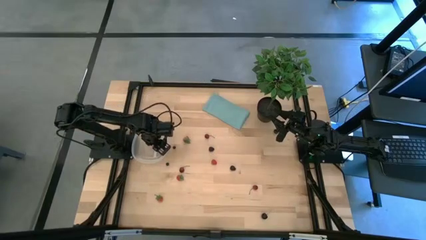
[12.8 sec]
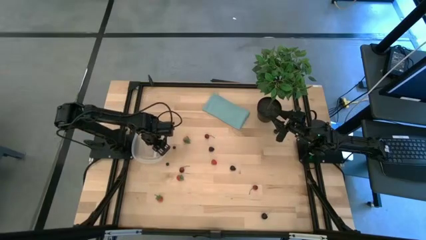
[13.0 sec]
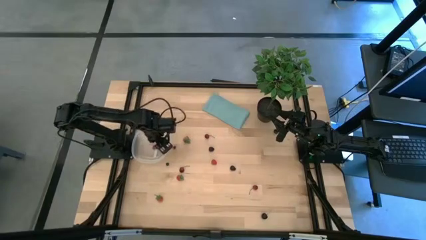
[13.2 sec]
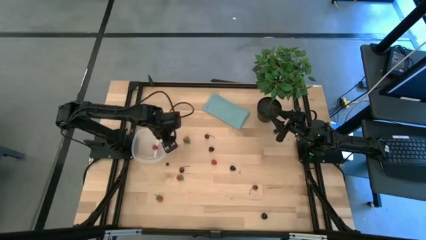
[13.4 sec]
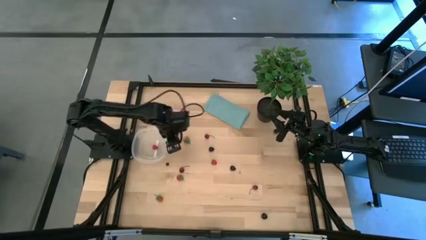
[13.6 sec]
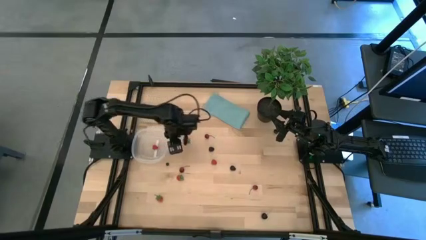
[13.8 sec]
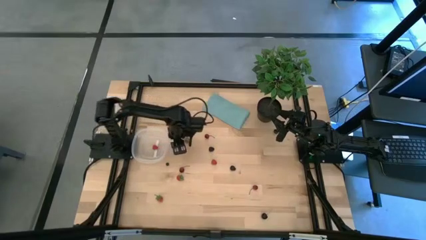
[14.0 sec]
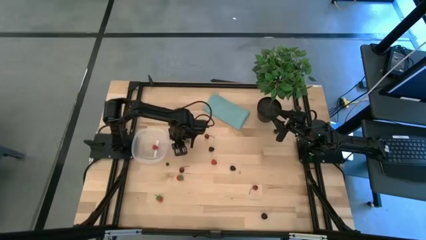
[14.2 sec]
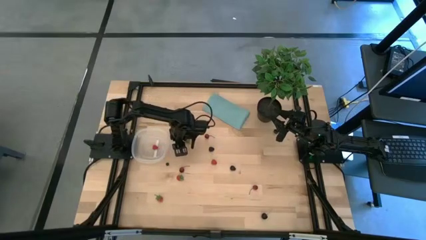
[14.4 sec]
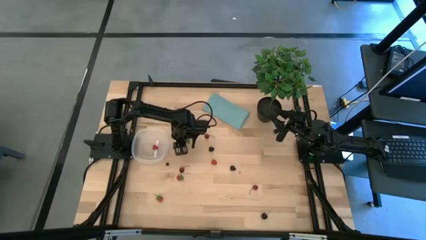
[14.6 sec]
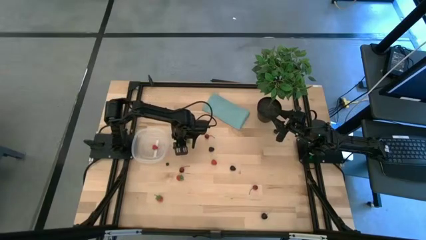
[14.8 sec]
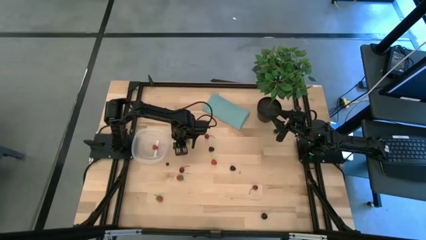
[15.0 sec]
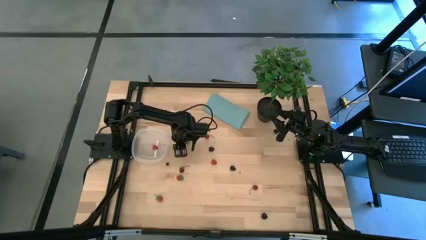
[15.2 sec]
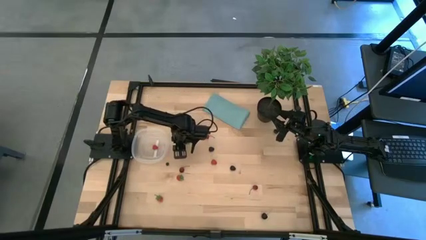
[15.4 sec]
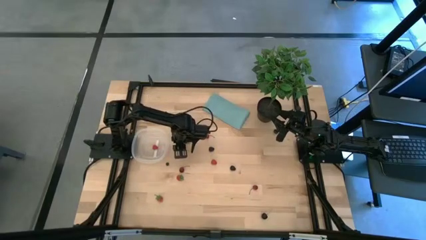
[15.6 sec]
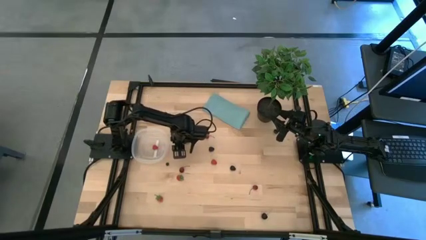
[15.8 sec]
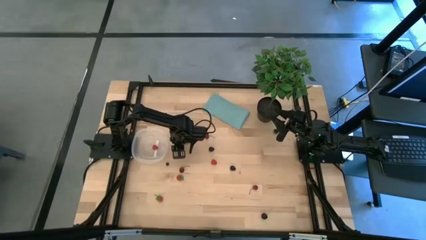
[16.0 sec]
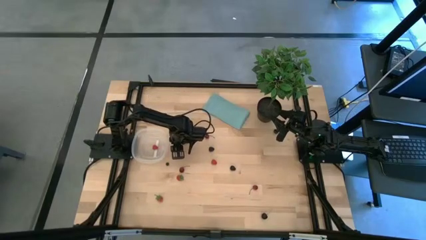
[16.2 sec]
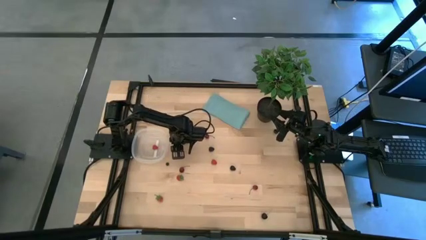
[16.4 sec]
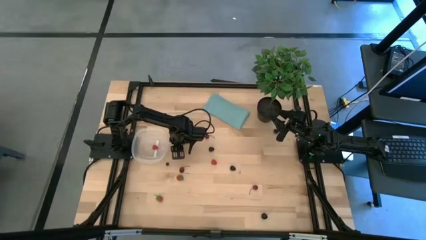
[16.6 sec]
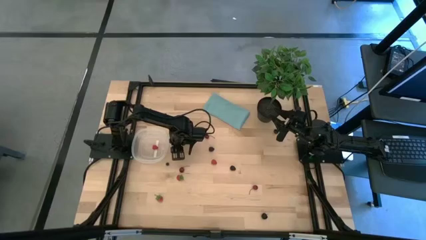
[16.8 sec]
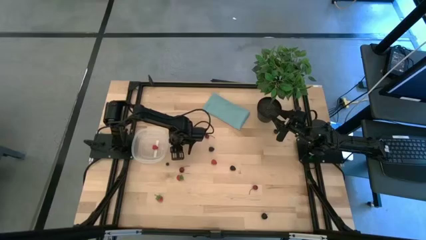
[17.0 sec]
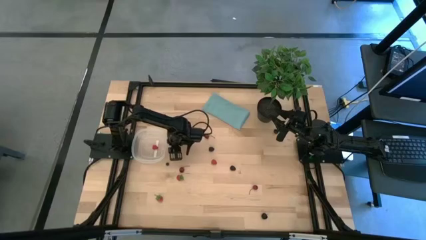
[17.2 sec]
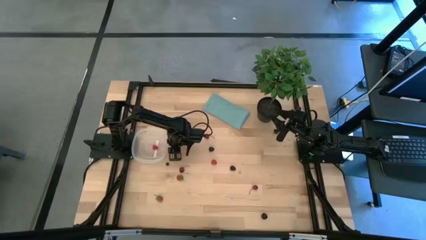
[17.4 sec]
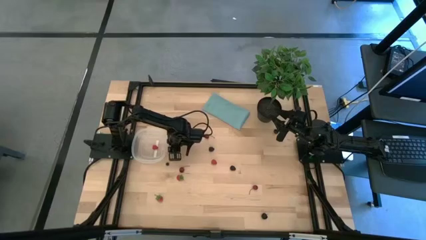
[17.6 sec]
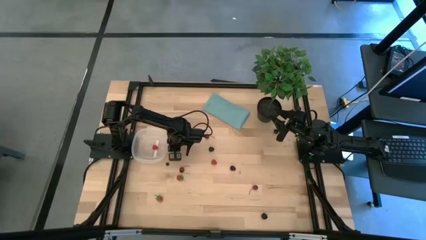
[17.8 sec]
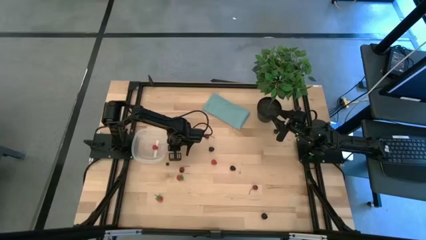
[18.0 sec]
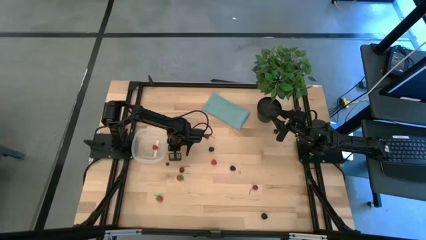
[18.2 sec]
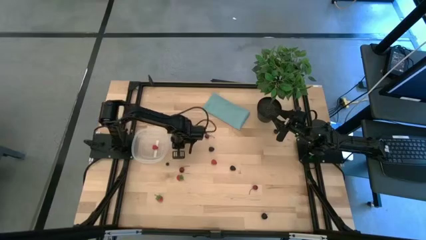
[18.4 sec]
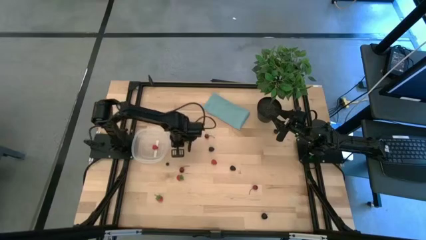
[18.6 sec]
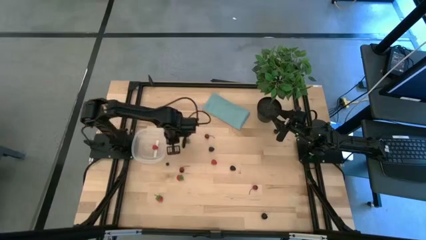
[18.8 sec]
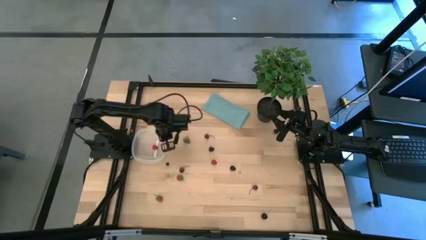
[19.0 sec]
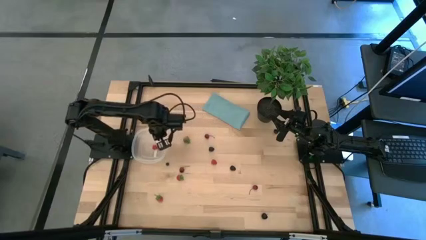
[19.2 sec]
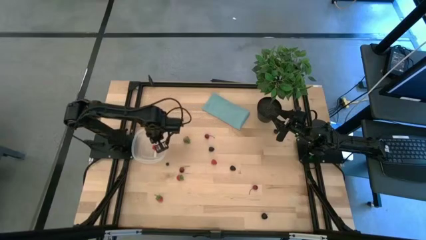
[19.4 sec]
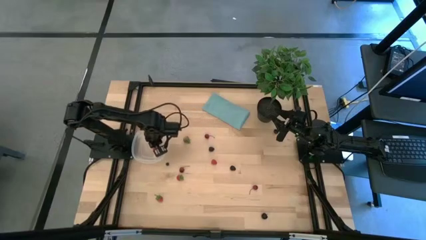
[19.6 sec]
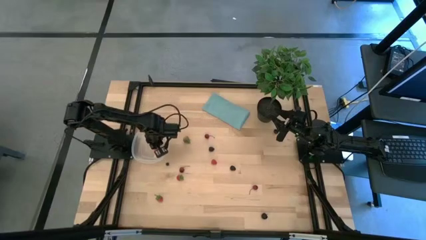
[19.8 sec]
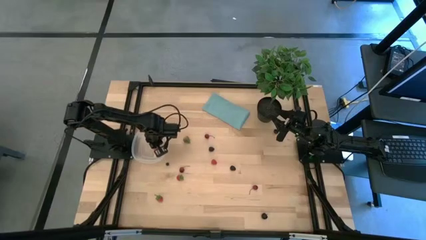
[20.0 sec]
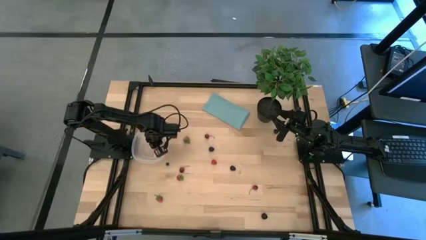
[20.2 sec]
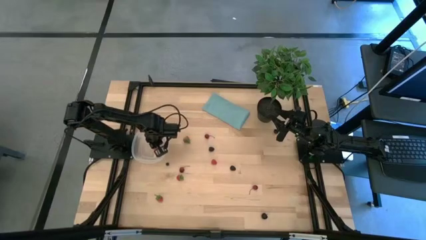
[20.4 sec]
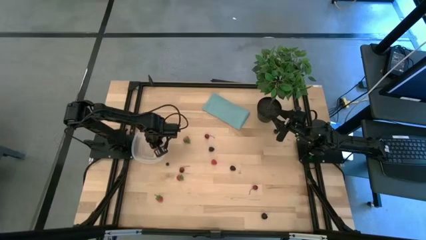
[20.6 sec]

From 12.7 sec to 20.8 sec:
Task: Pick and placing Produce into tupperware
Put the top blueberry into the transparent bin

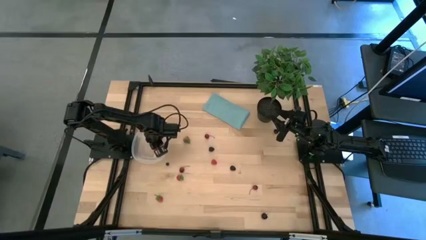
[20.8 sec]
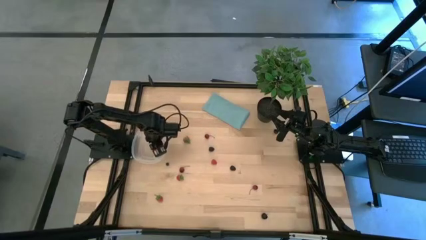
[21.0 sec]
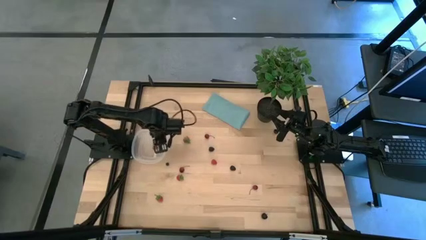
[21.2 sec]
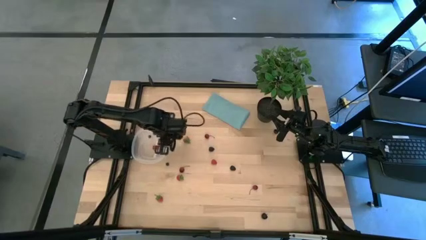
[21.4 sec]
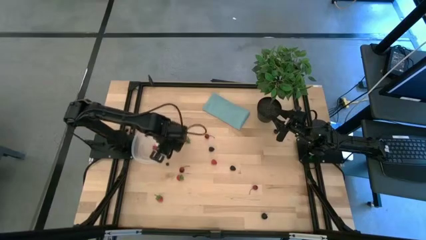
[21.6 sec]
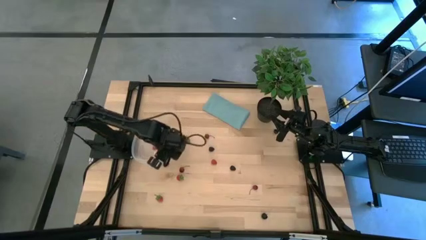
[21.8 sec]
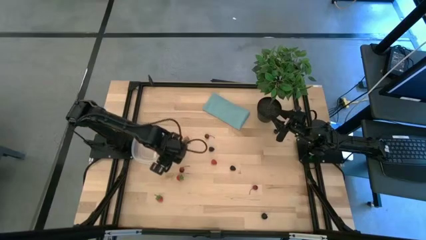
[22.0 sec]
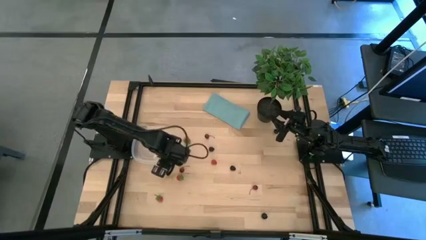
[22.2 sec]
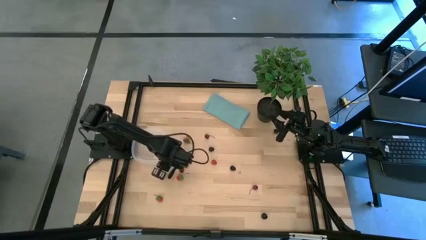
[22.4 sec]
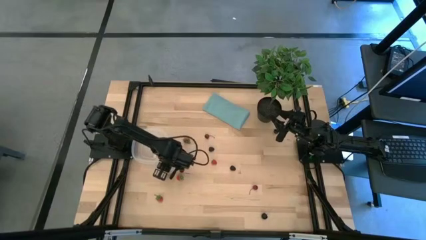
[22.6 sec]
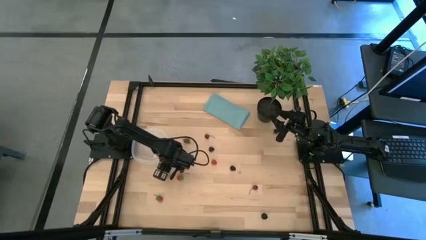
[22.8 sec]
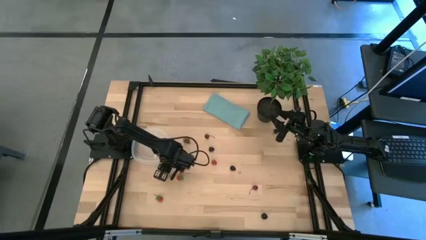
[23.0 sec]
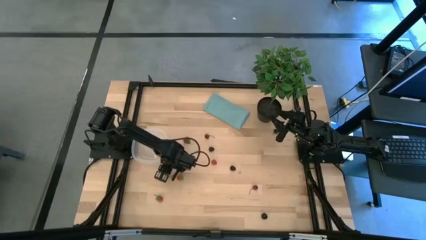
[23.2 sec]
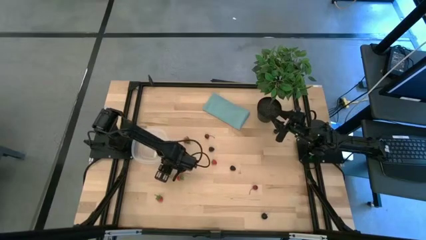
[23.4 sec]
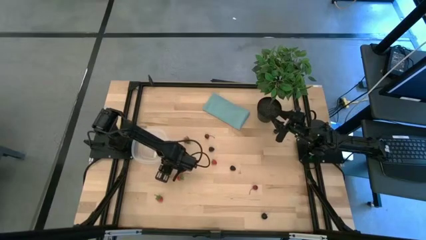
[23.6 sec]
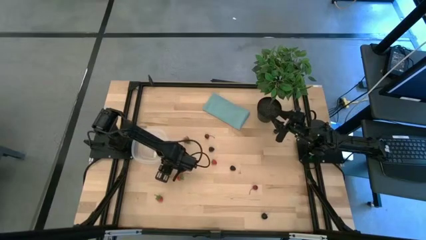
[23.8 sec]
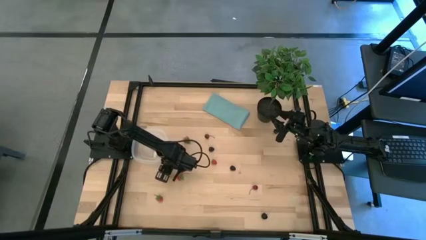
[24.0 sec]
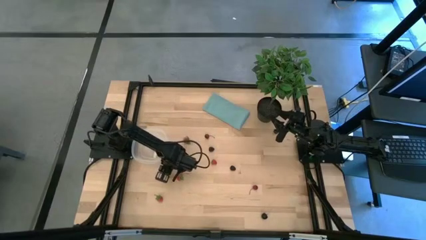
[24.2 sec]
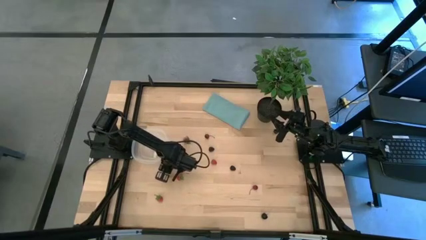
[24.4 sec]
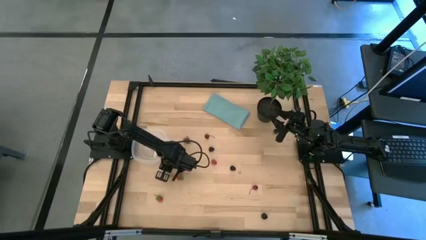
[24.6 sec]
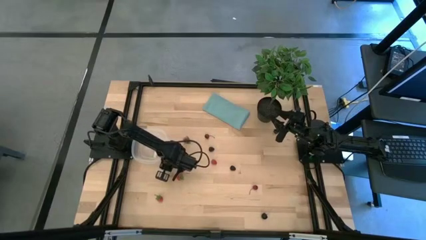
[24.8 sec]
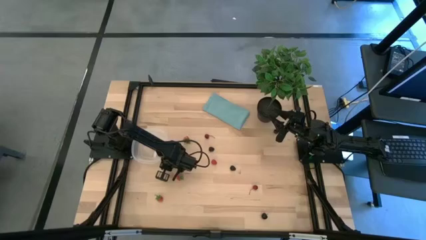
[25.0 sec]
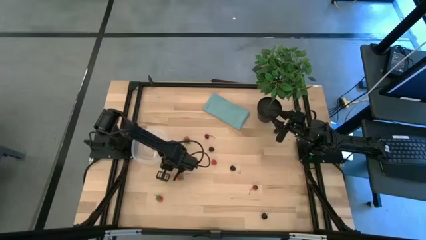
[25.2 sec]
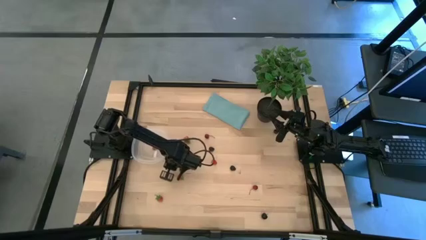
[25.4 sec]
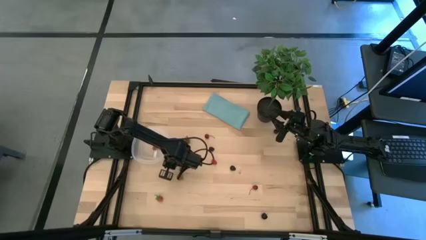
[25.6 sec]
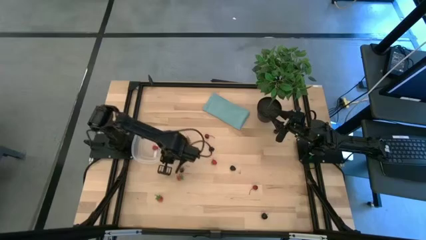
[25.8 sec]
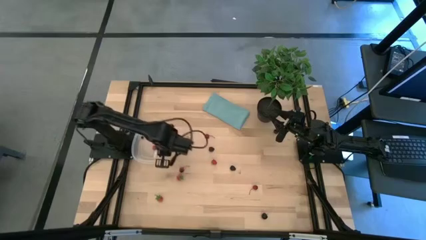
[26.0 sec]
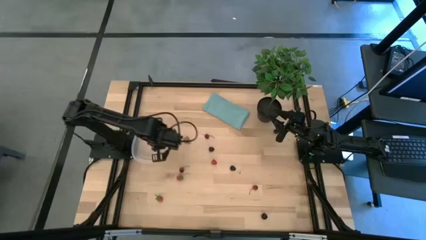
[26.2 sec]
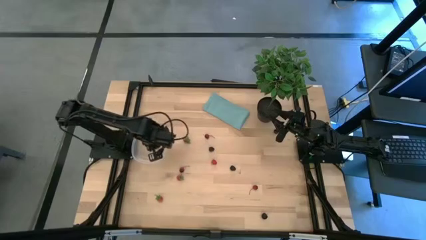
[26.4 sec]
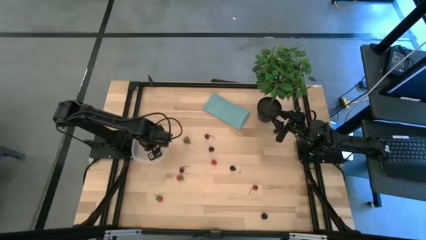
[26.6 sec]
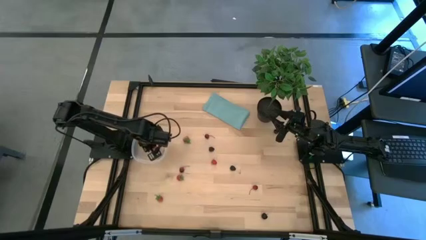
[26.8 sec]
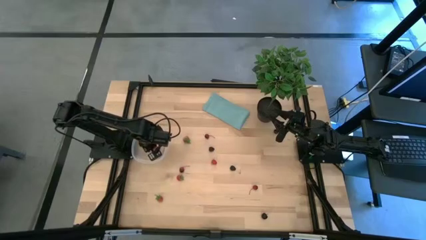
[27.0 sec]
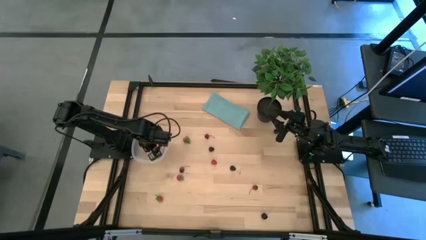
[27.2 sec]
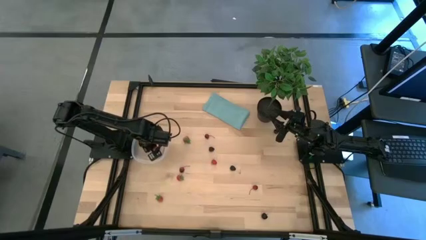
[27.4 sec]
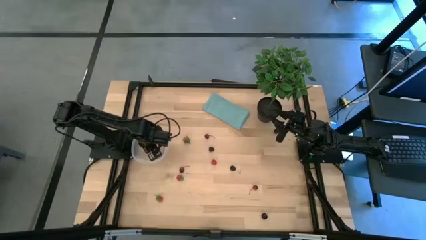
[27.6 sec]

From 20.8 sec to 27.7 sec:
Put the blueberry into the transparent bin

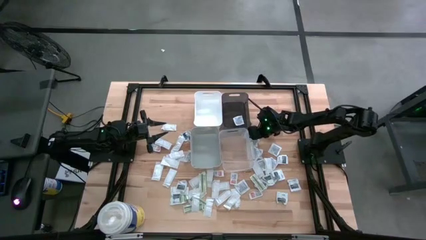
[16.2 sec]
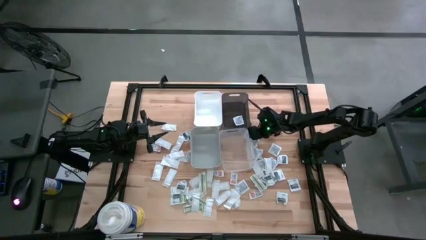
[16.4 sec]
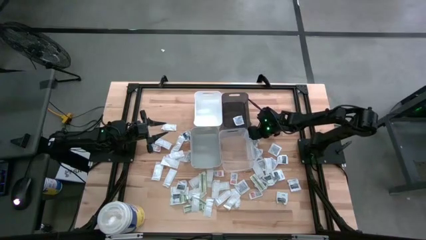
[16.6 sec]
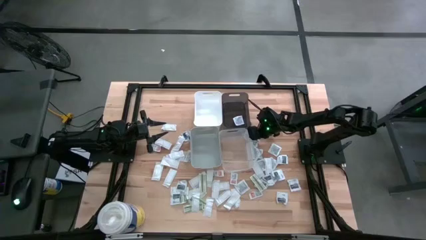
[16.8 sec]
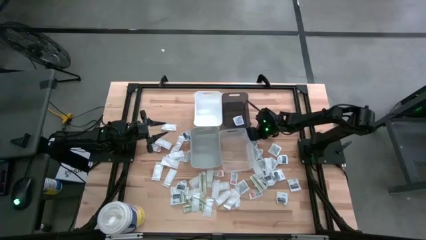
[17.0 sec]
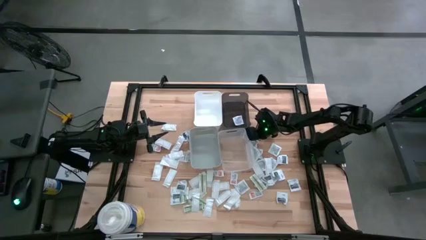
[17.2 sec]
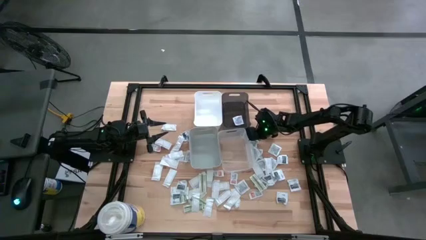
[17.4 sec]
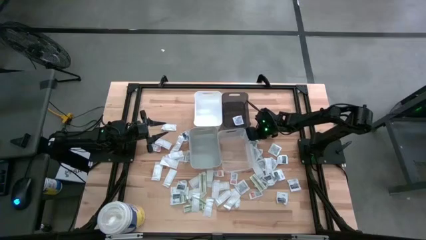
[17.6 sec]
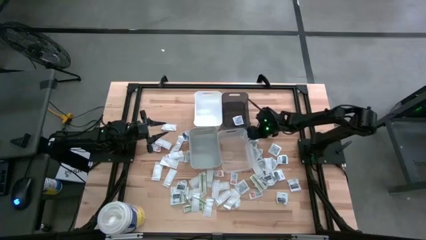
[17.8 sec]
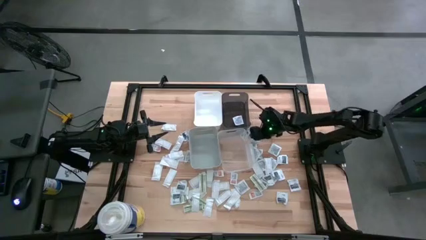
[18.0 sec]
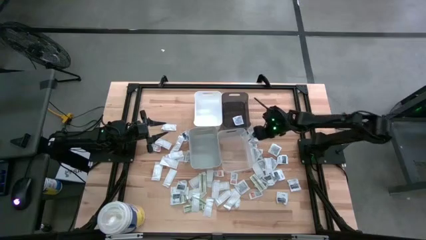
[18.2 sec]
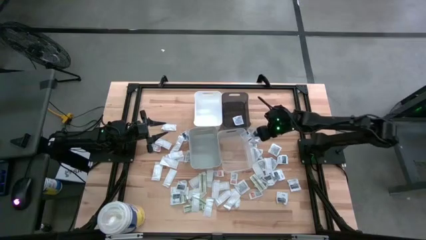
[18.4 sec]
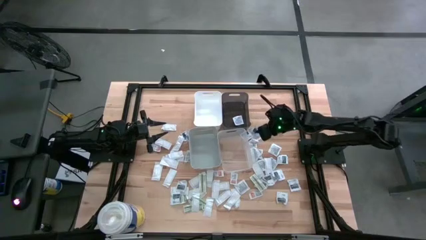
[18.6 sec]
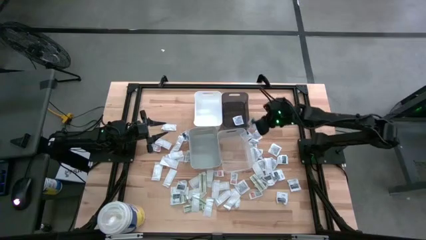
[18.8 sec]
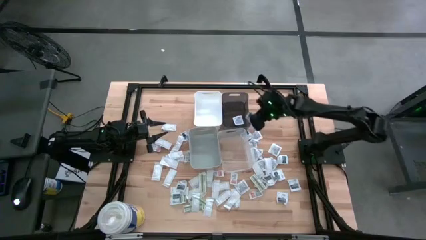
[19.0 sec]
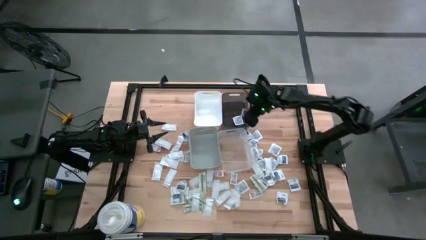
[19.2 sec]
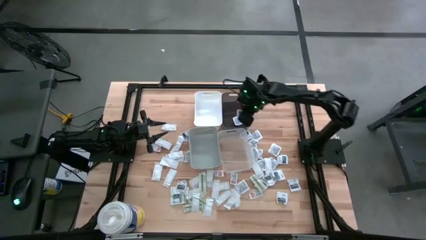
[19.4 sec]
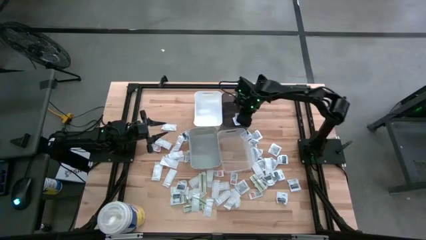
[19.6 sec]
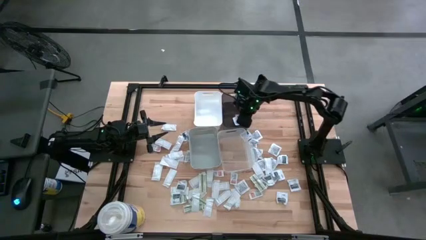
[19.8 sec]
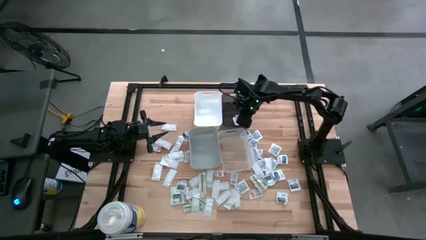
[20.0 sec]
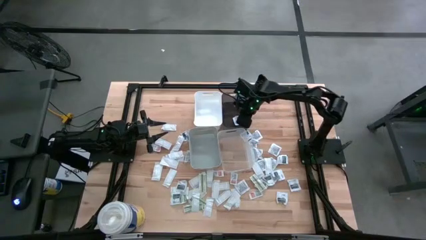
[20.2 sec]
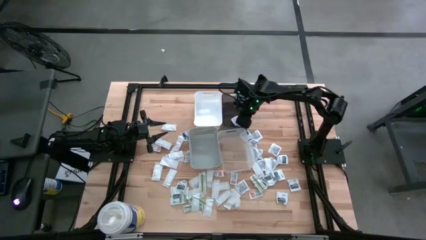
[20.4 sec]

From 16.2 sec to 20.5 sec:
Task: Pick & Place First Aid Supplies
Put the blue alcohol pad into the black bin
